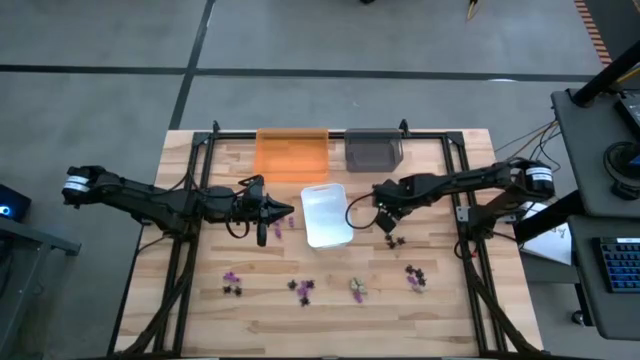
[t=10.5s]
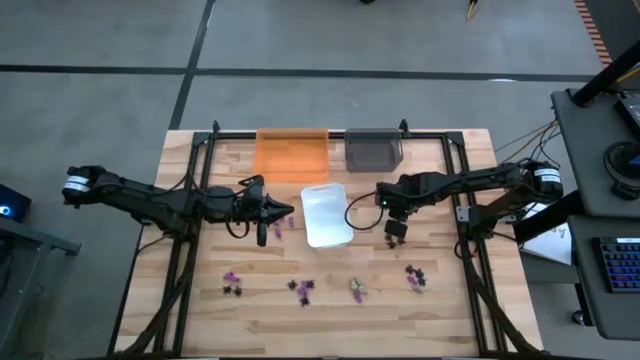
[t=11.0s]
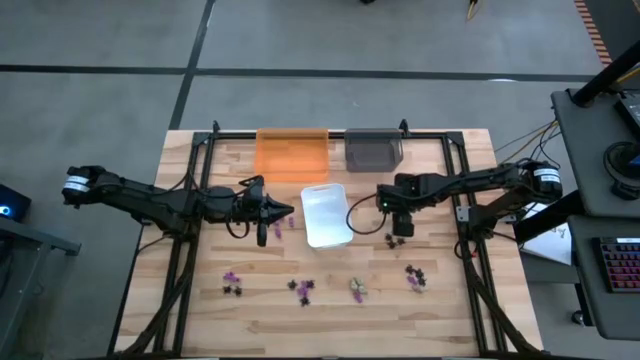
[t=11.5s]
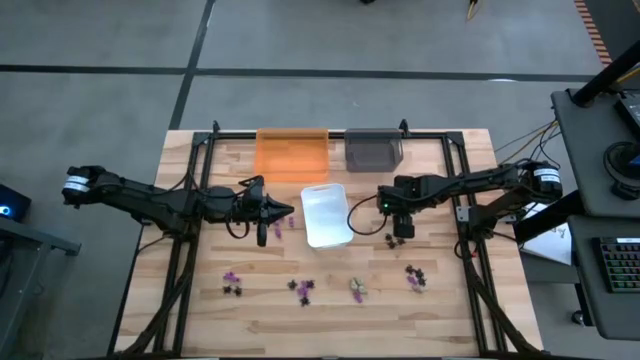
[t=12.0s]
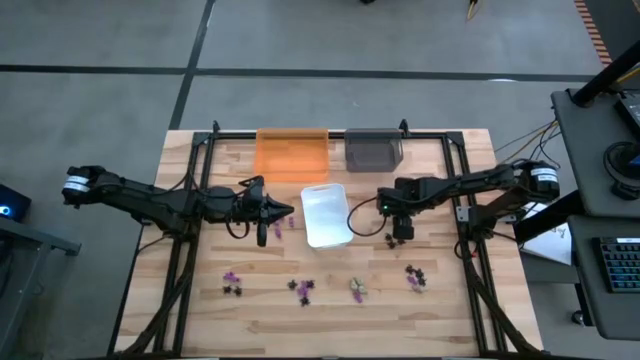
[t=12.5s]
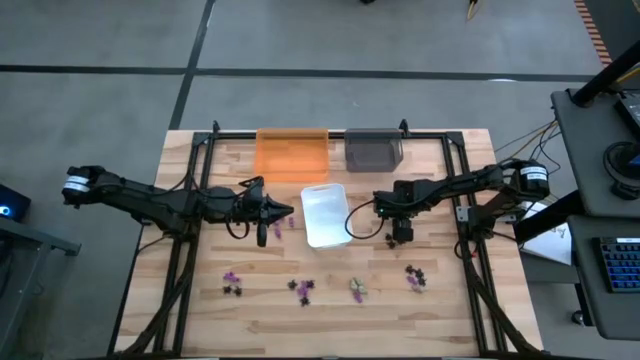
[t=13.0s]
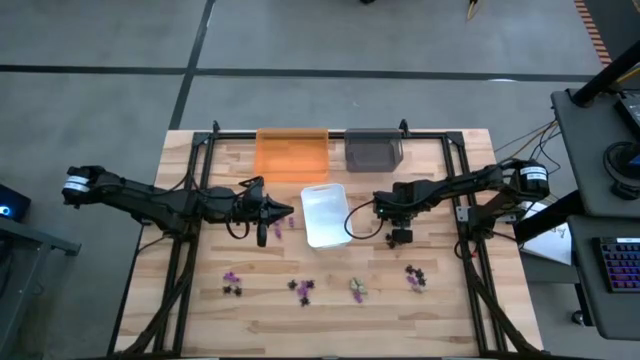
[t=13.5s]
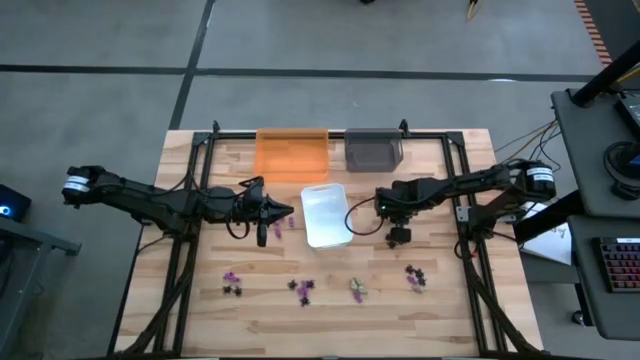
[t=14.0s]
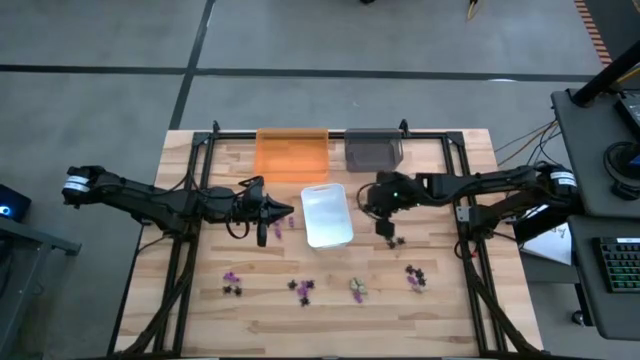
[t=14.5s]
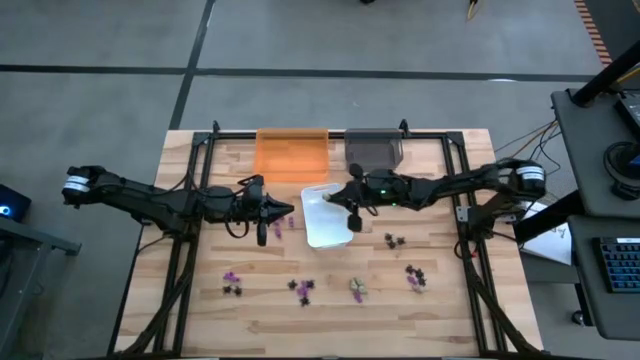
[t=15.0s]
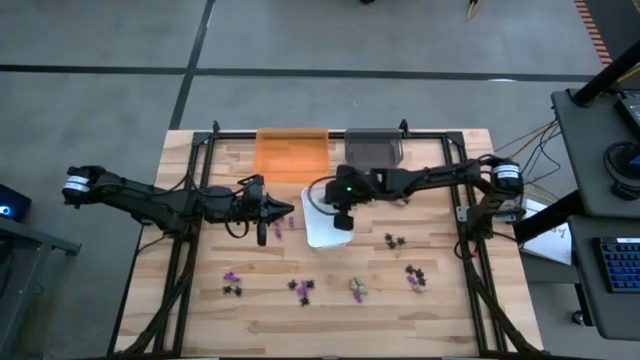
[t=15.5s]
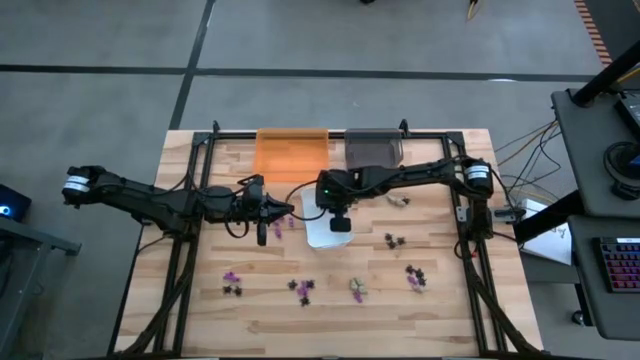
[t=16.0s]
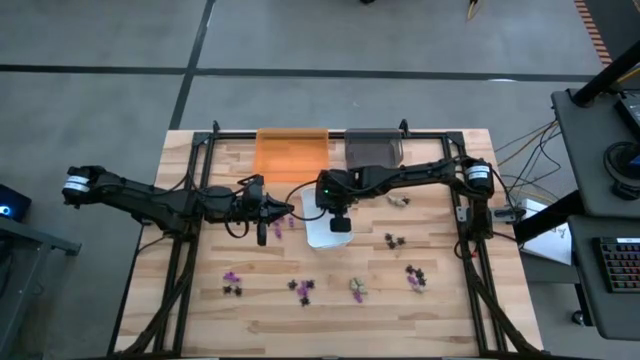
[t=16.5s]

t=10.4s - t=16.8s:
Task: Sort Halloween decoration
Put the white skull toy into the white bin

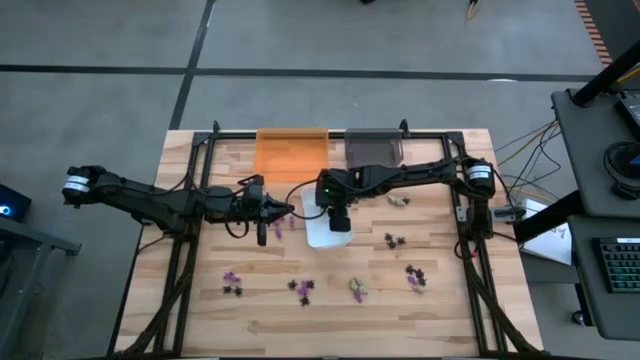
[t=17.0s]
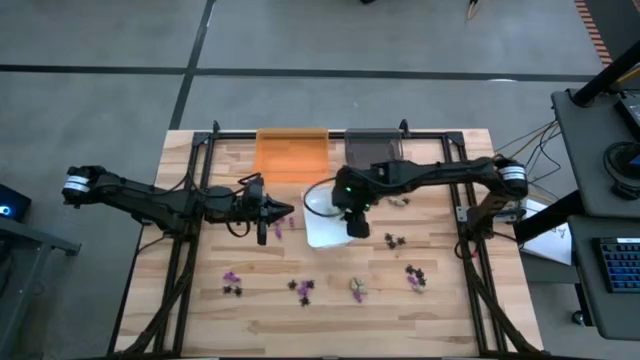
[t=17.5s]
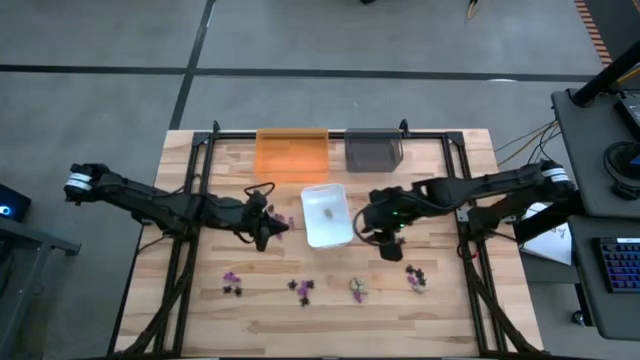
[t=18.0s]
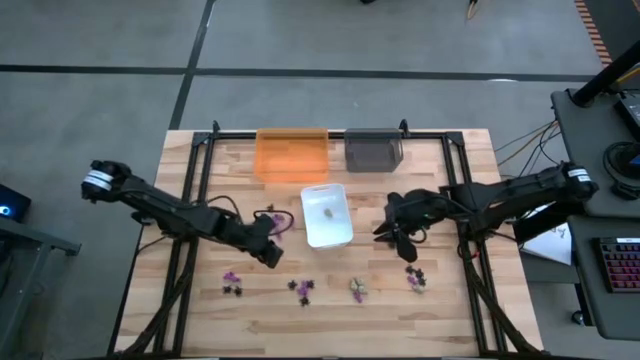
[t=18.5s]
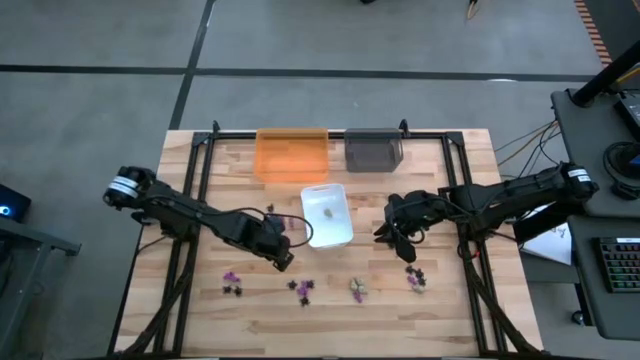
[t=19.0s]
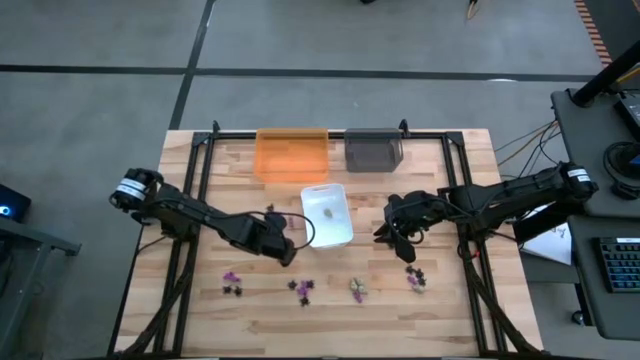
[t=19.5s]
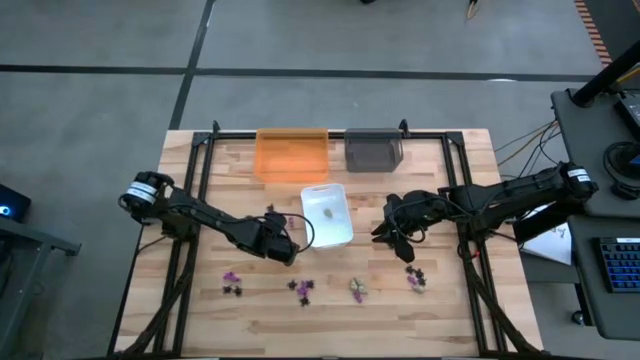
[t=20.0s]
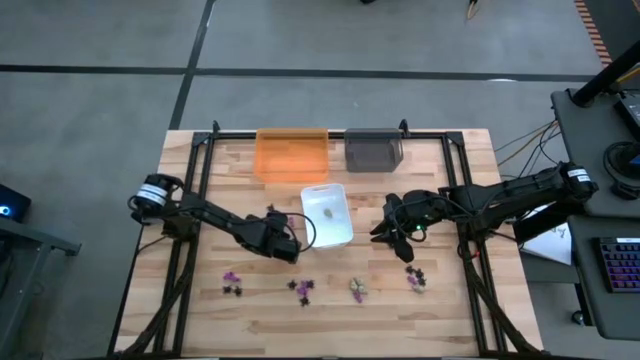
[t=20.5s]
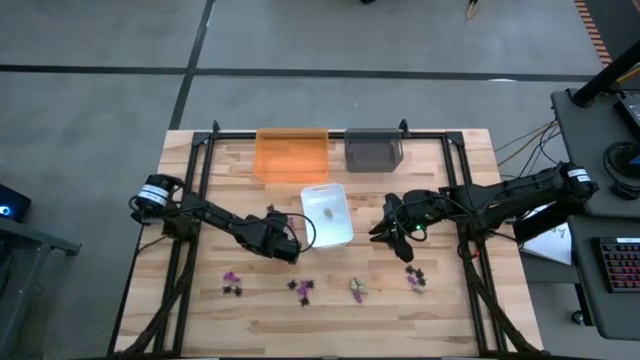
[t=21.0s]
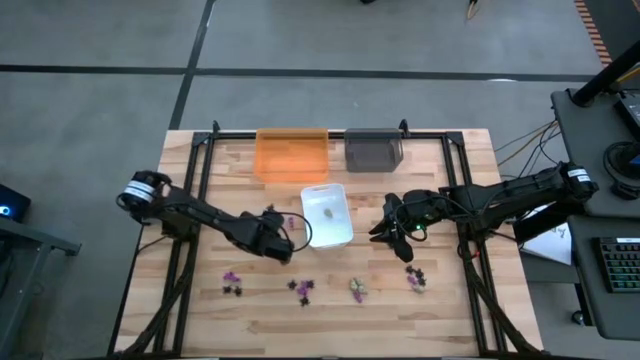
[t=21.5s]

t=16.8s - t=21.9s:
Put the purple skeleton toy into the orange bin

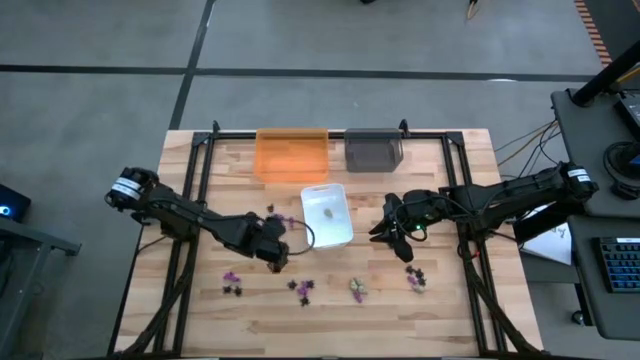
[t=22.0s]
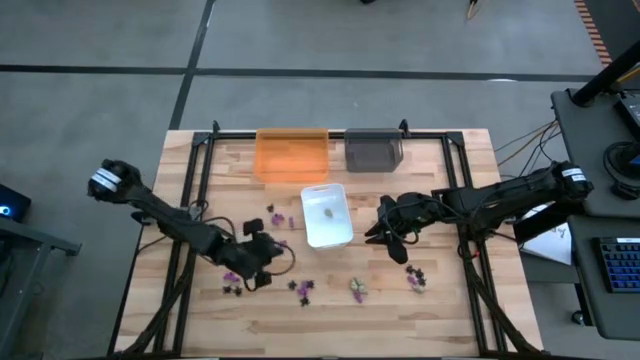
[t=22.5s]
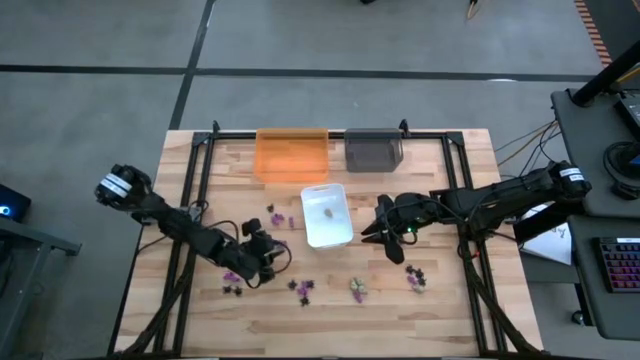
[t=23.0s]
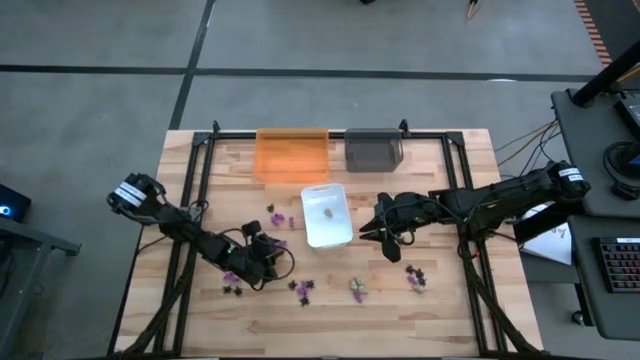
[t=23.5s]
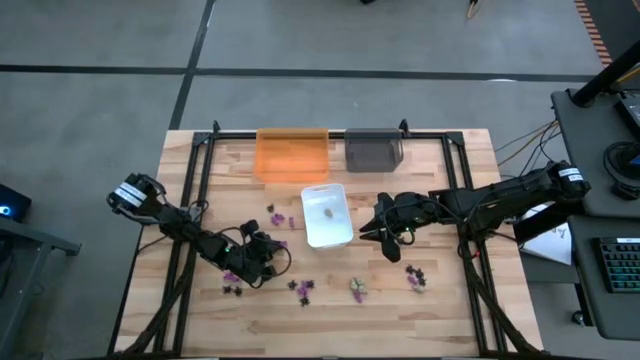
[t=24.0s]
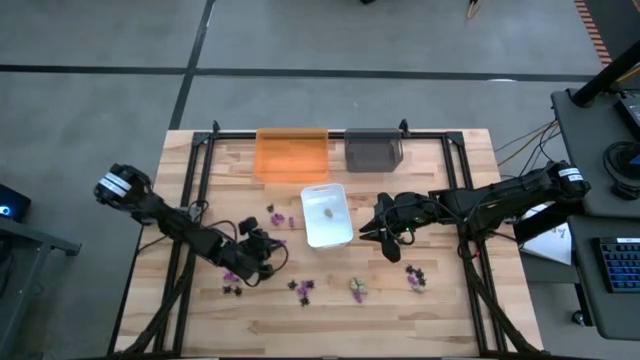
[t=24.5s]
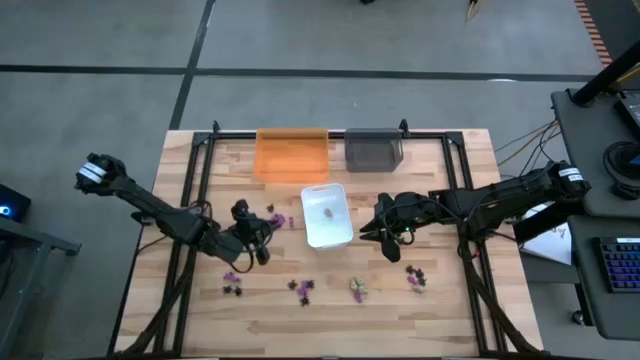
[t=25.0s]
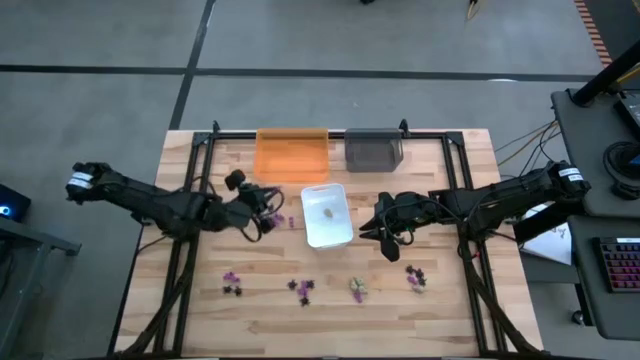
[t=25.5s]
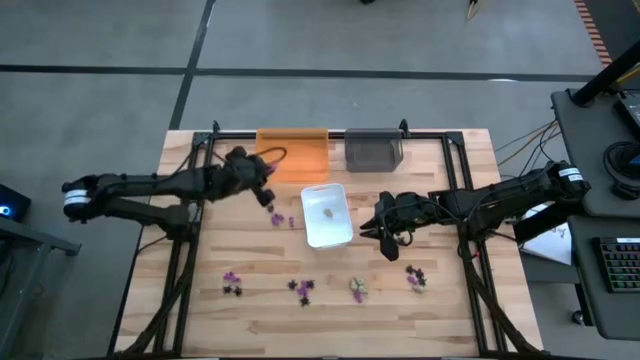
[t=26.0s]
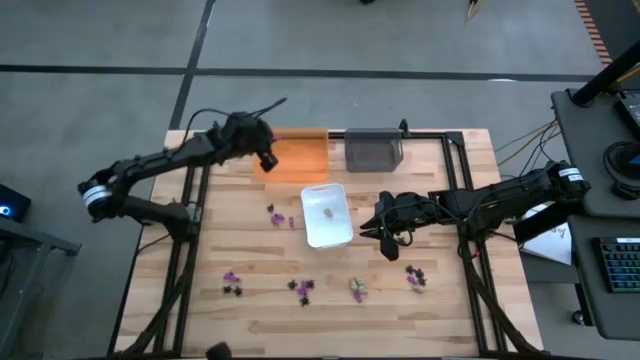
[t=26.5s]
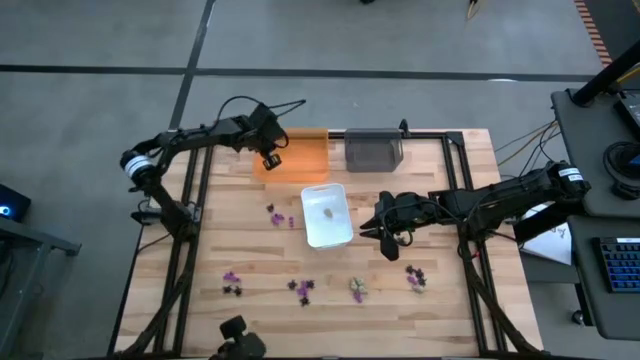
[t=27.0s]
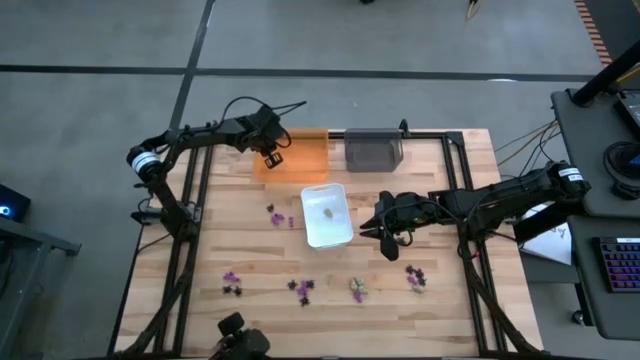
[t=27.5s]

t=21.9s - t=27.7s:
Put the purple skeleton toy into the orange bin

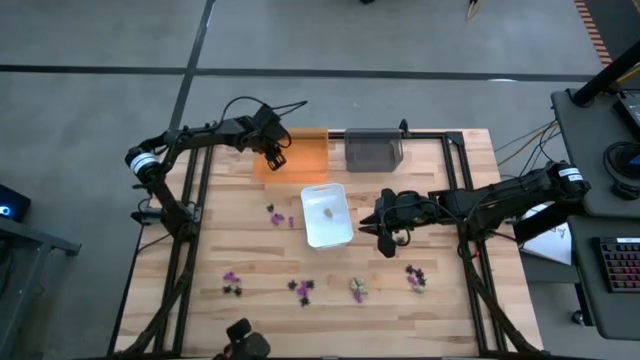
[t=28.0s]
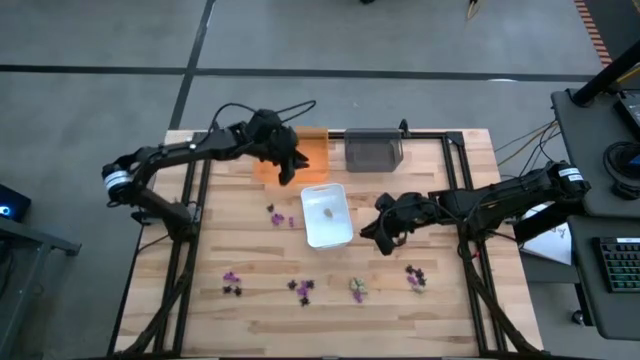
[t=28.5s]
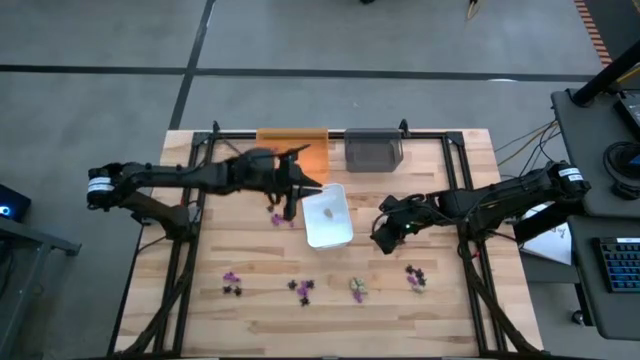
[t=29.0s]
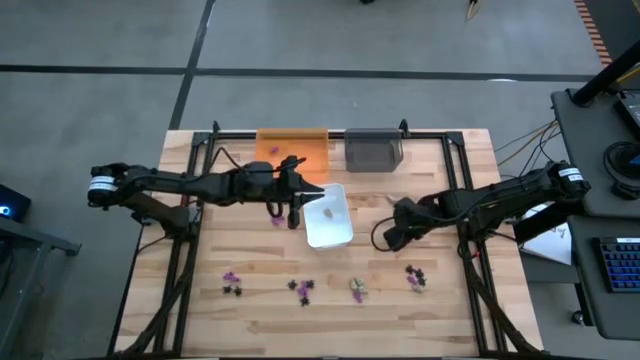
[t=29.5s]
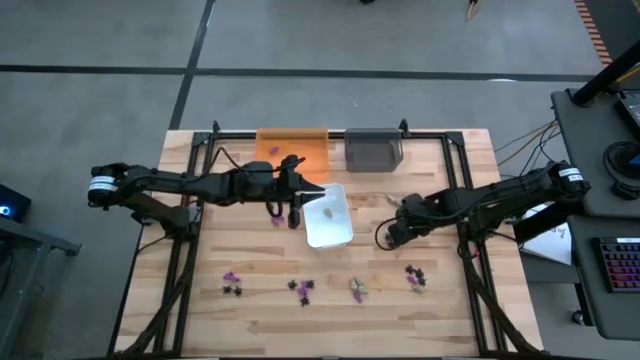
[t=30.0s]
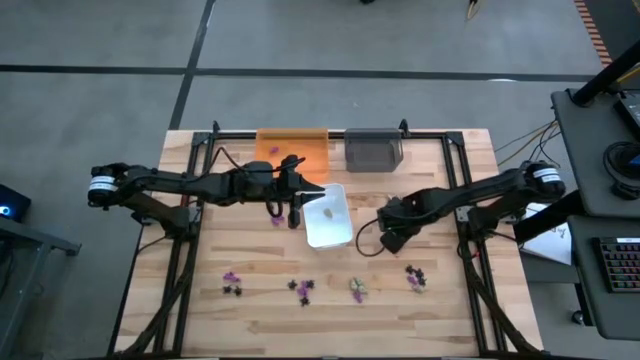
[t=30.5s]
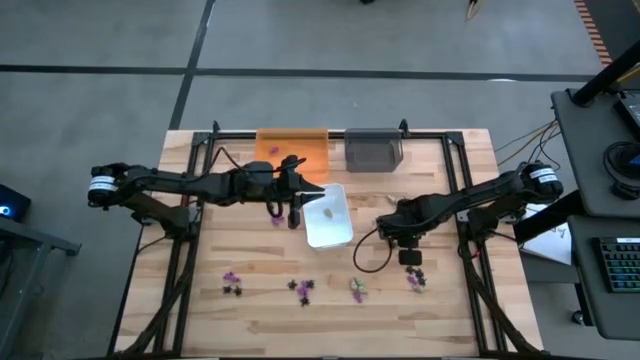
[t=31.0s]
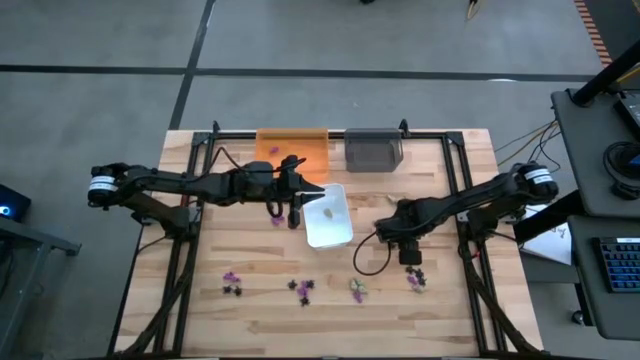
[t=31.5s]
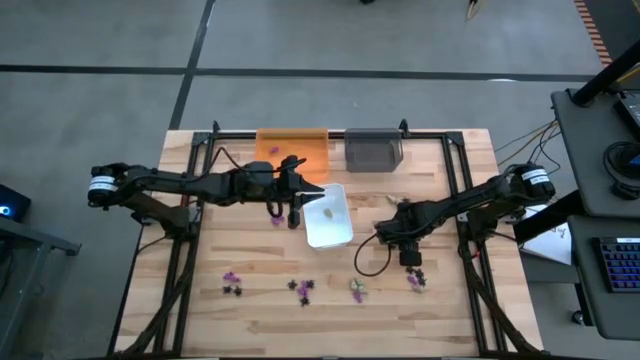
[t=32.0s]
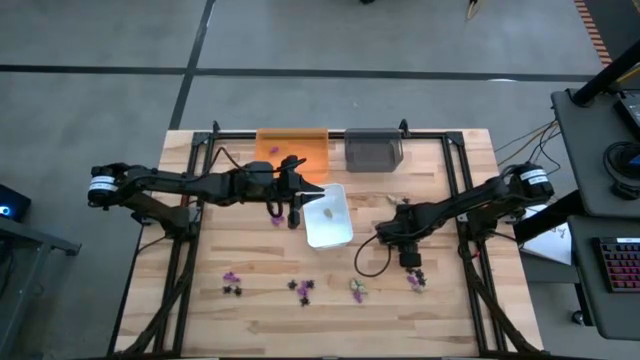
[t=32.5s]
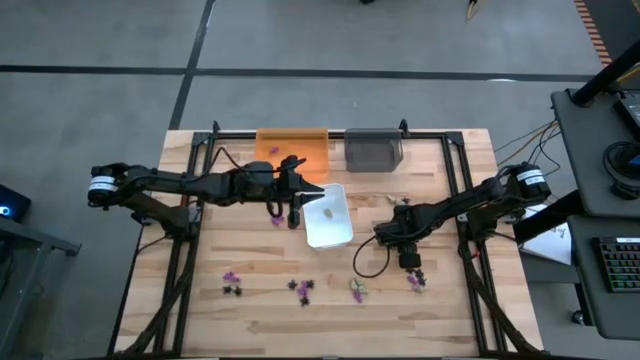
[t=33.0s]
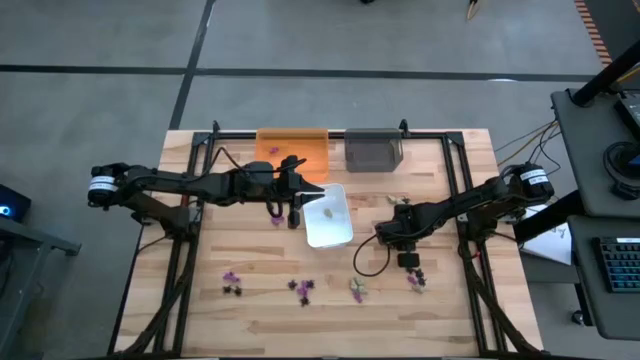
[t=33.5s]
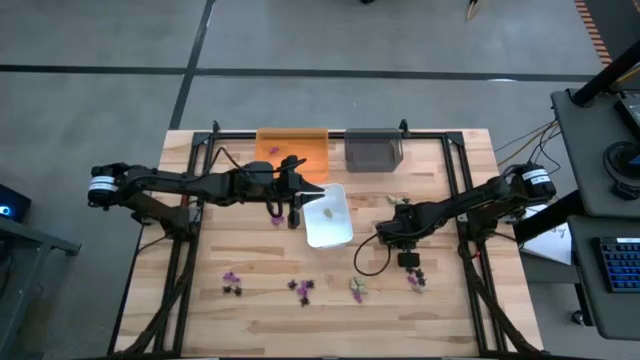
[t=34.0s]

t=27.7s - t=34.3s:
Put the black spider toy into the black bin
